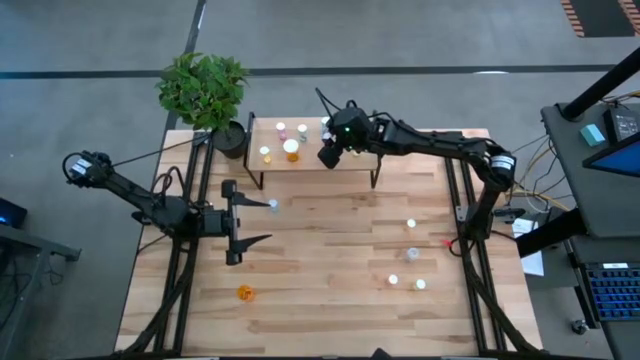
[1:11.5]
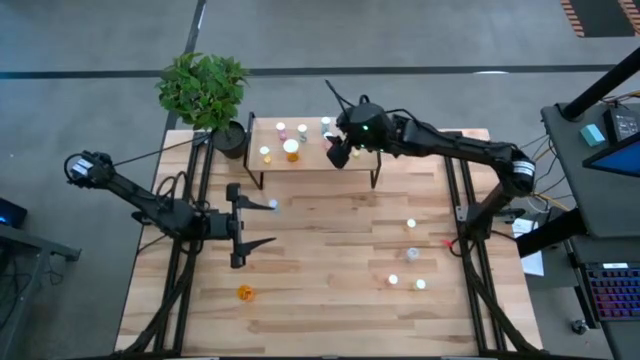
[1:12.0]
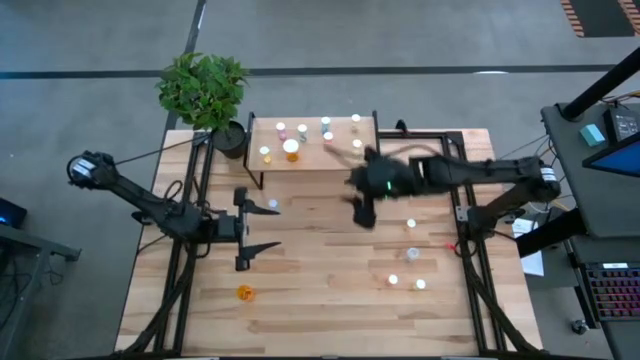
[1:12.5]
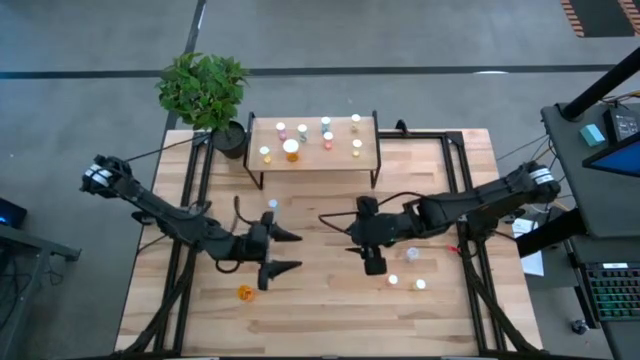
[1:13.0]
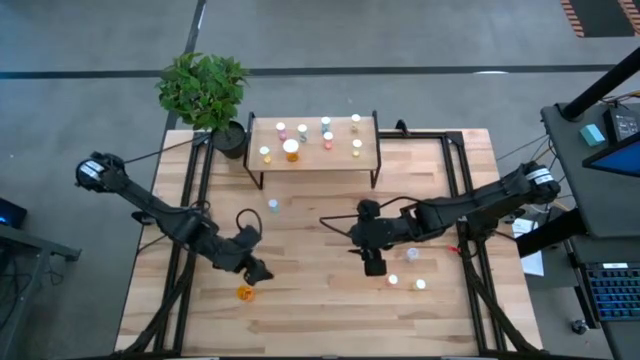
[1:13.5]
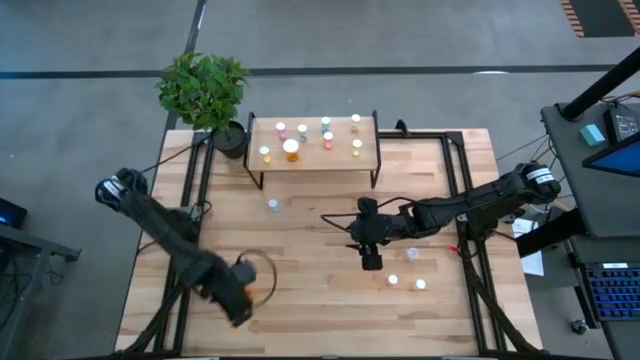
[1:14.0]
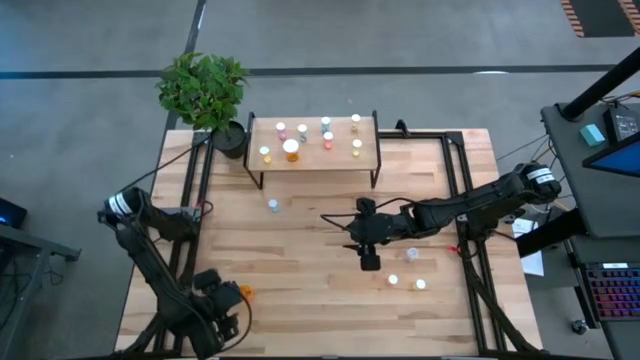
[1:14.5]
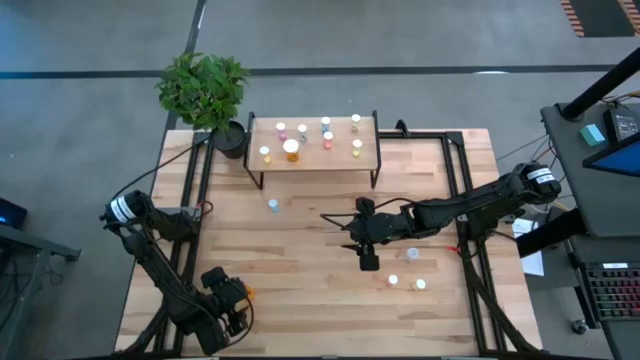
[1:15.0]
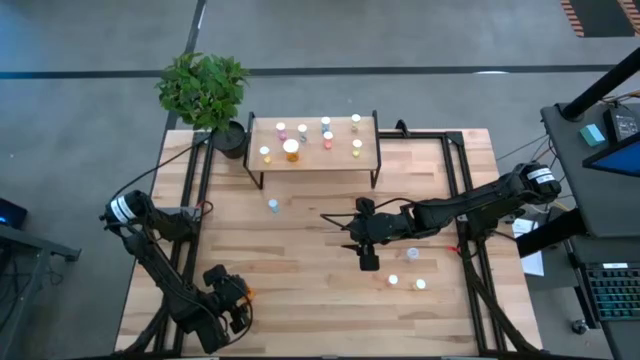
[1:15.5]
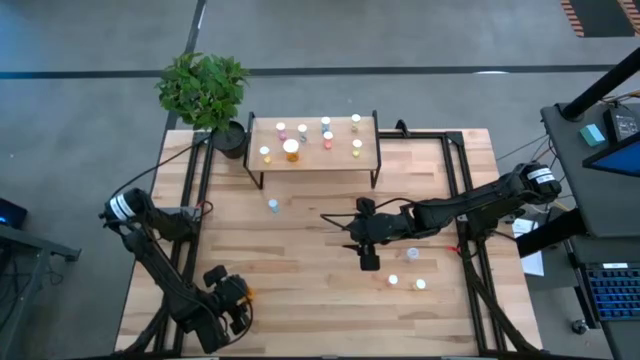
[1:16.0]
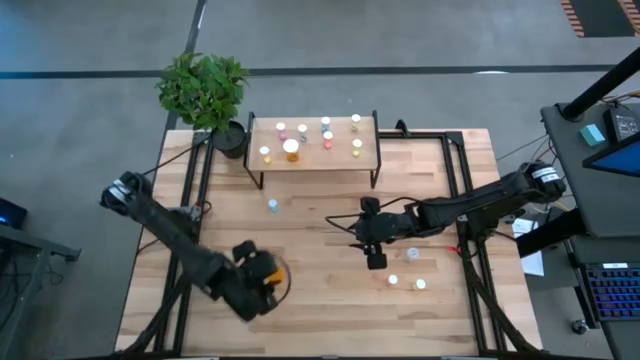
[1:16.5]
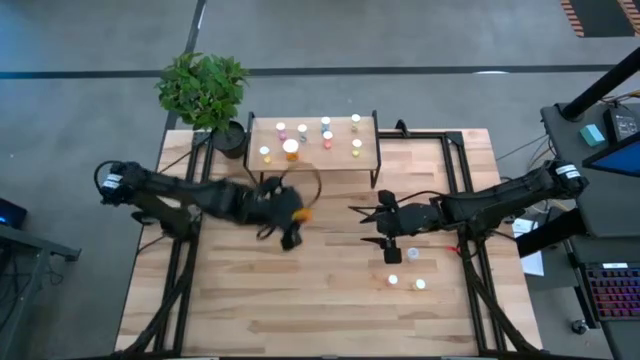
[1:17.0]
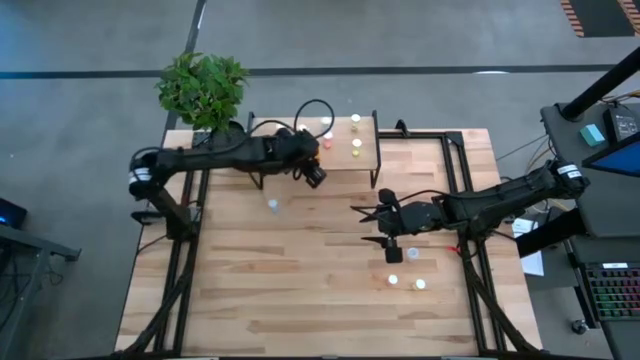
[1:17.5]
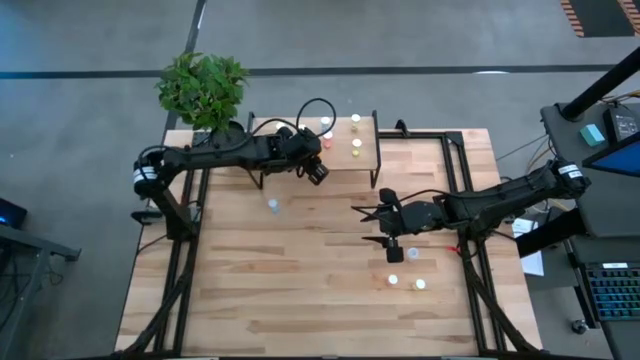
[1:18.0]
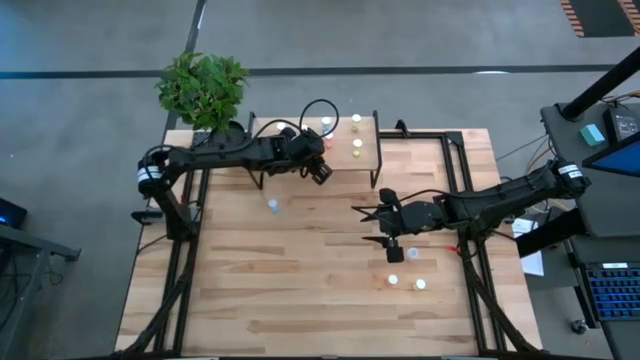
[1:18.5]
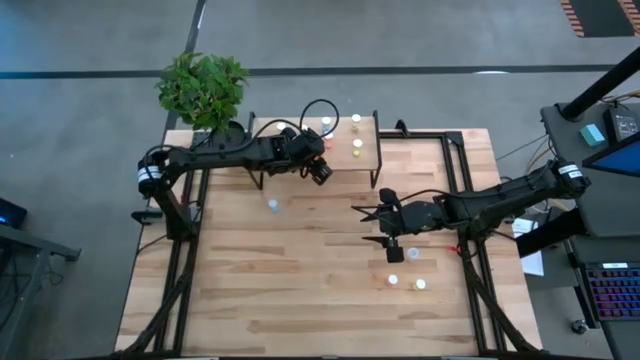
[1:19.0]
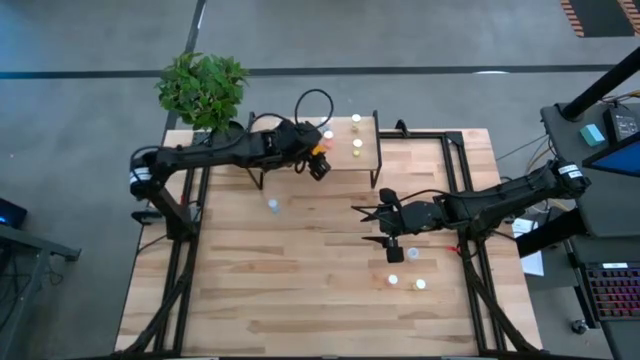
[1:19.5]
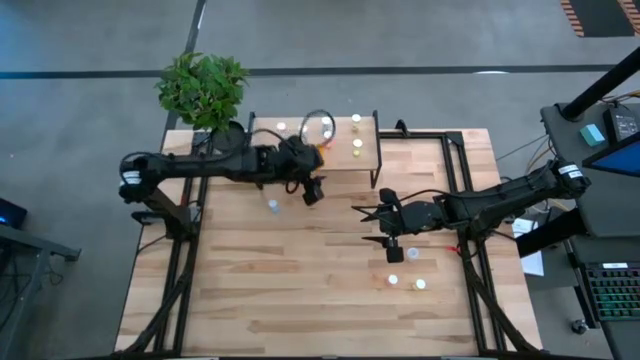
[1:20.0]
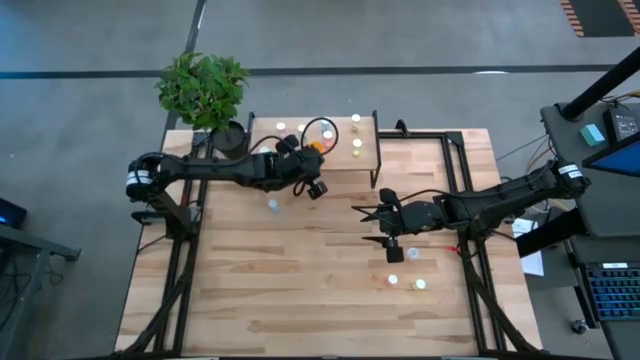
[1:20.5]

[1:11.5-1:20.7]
Task: Pick and place medicine bottles onto shelf by color
Put the orange pill bottle on the shelf

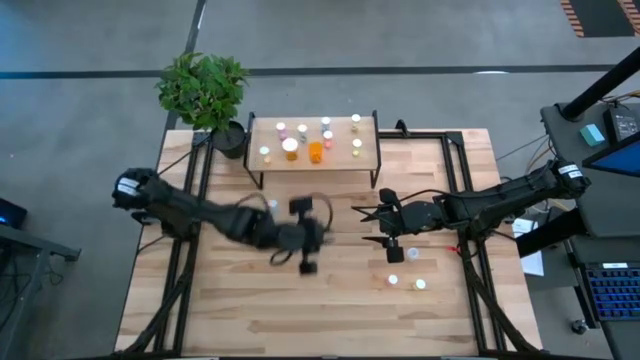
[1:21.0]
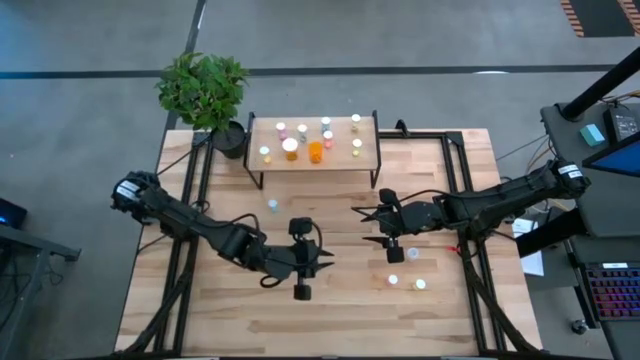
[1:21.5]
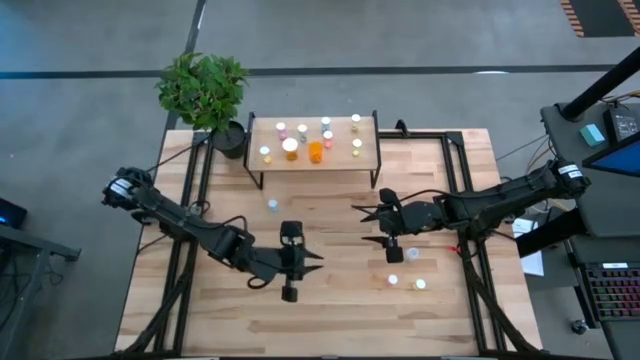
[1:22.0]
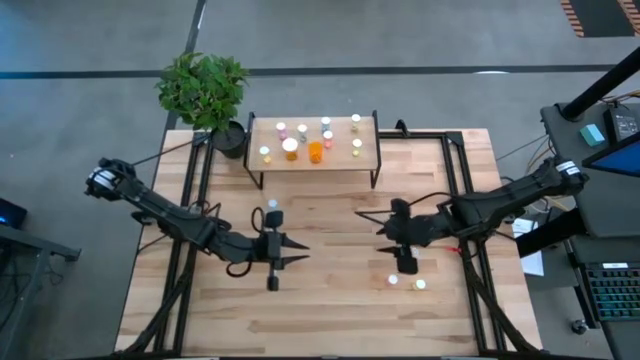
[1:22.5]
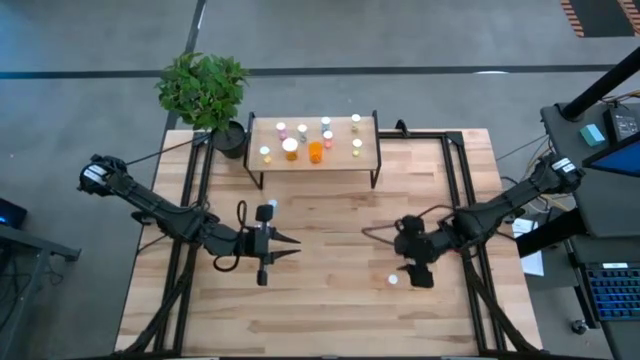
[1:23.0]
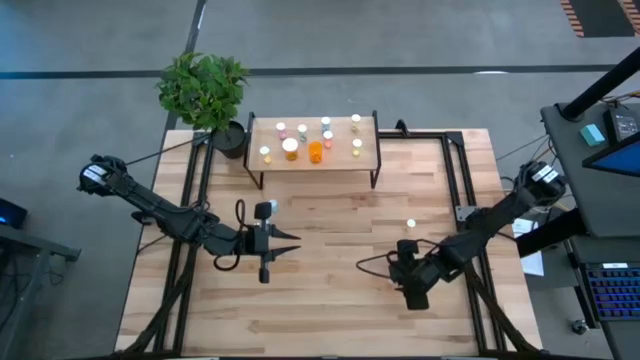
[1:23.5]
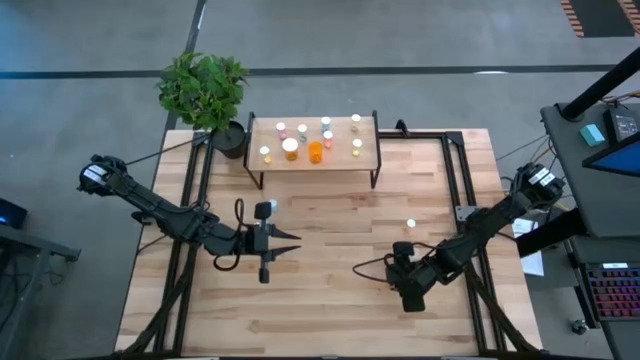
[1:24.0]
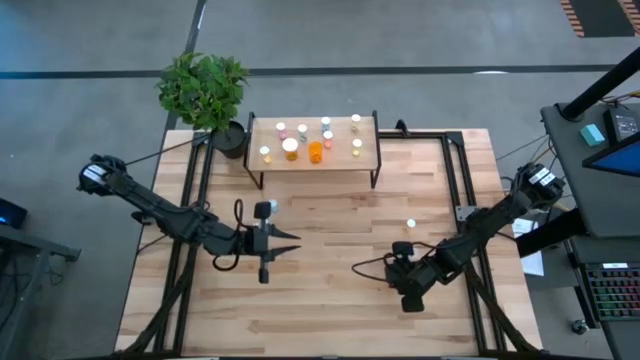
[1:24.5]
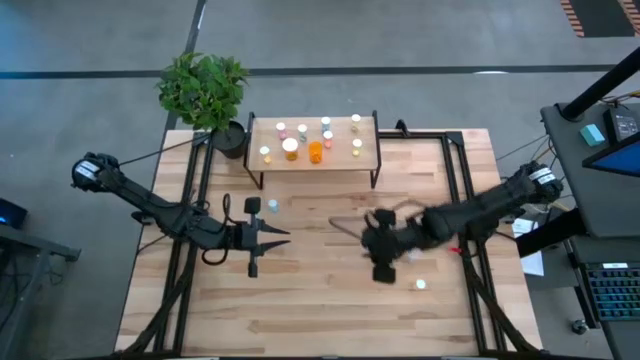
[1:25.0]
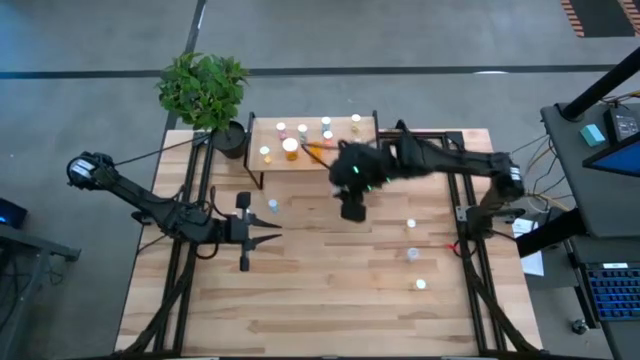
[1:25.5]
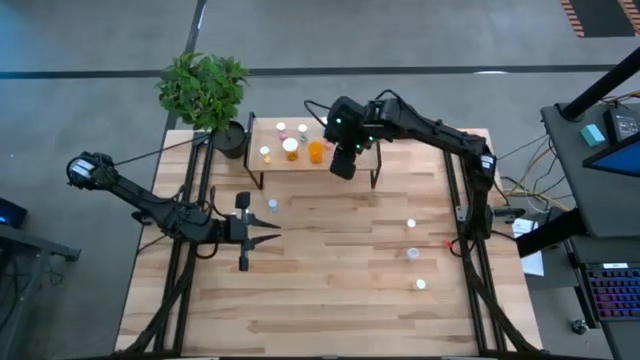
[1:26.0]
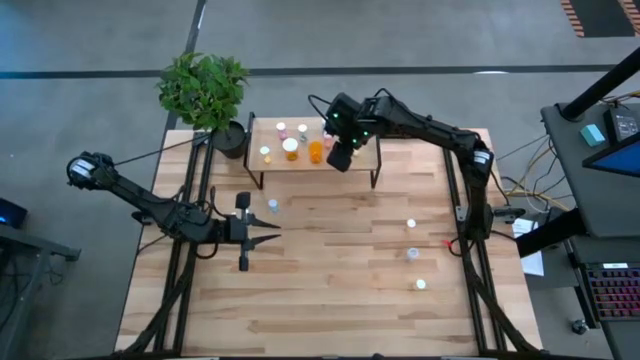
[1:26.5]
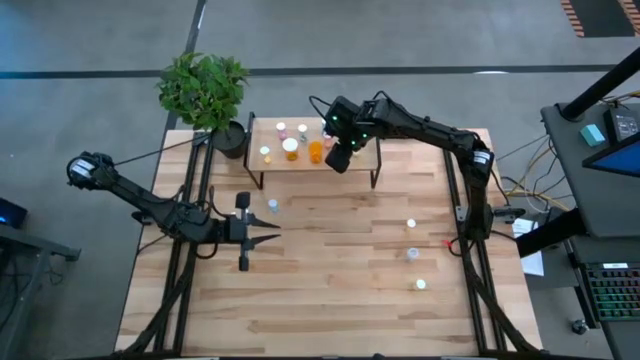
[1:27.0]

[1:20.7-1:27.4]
Put the pink pill bottle on the shelf

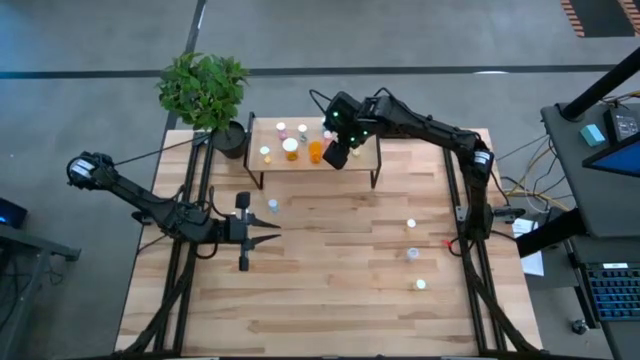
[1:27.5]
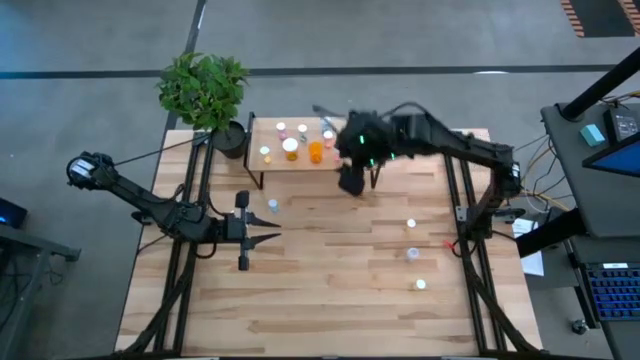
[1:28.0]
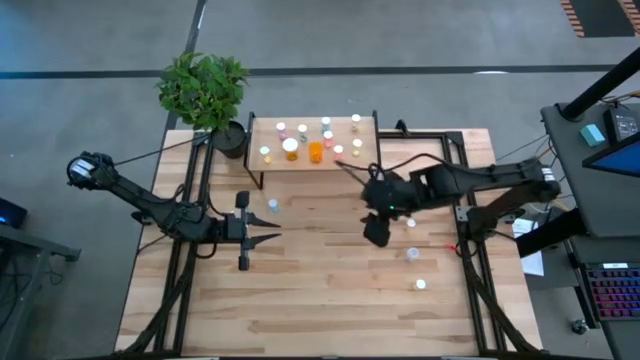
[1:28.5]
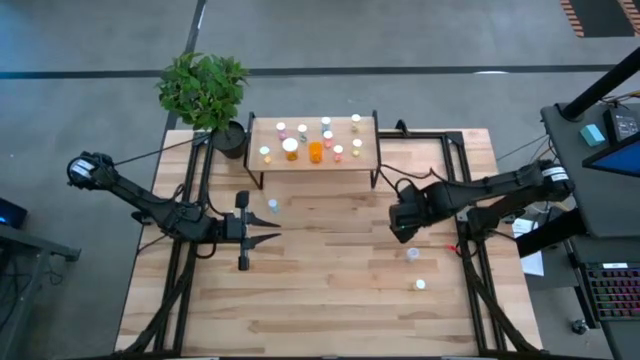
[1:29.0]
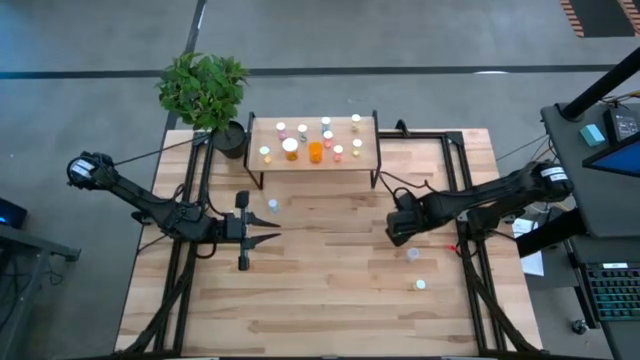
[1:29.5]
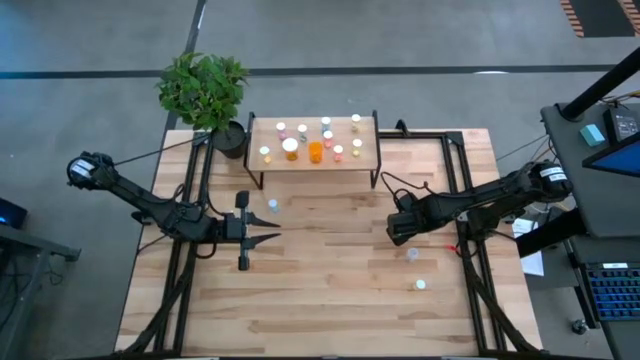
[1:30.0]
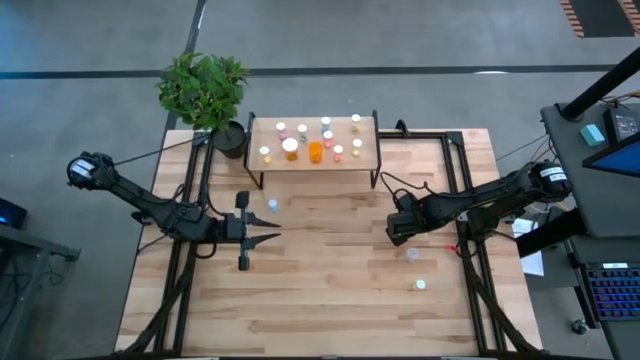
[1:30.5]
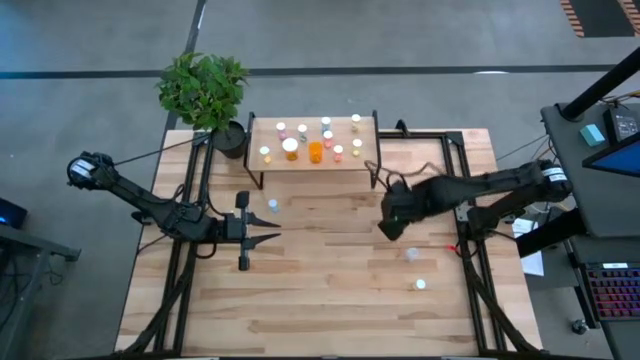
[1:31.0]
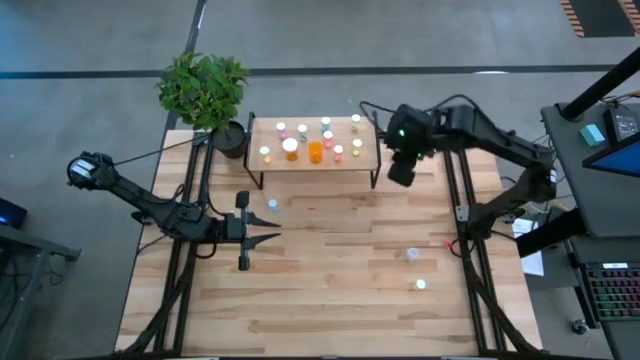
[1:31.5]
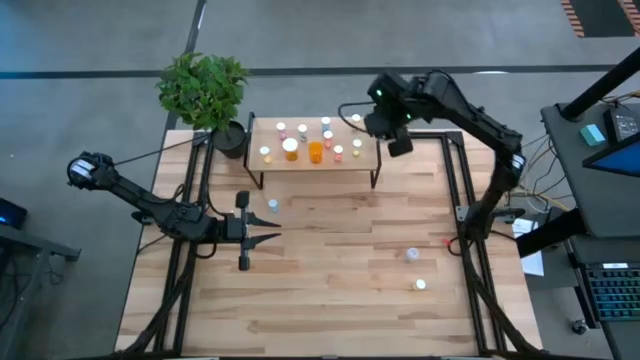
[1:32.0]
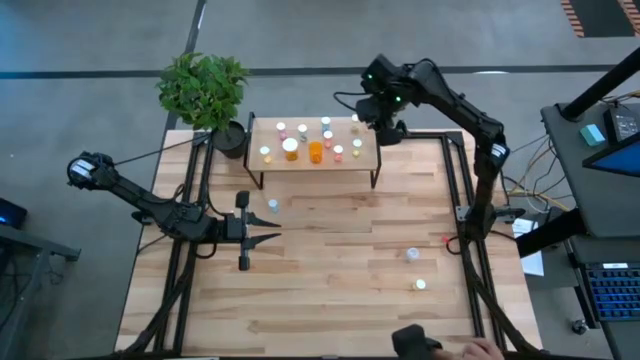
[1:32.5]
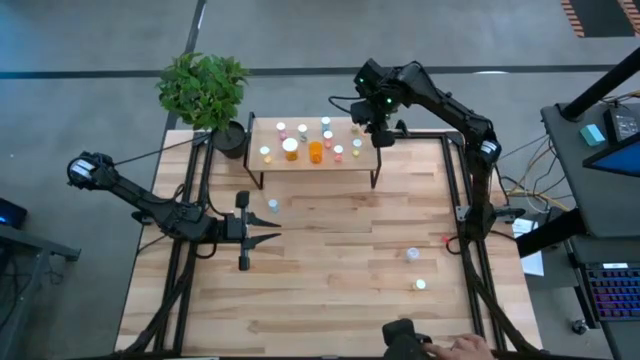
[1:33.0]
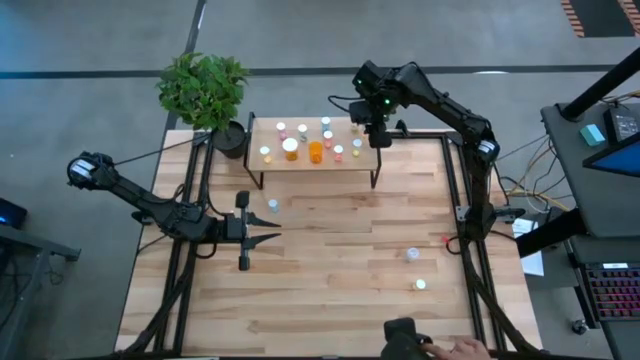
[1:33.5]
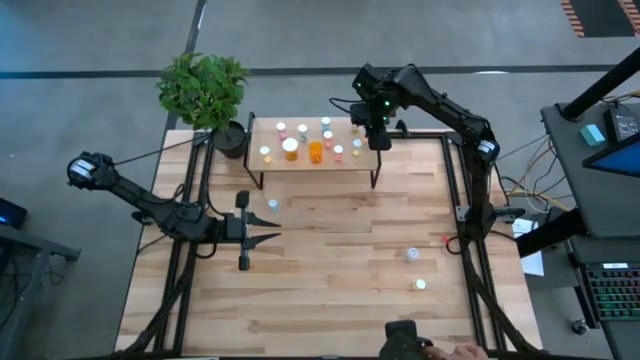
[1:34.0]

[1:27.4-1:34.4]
Put the yellow pill bottle on the shelf
